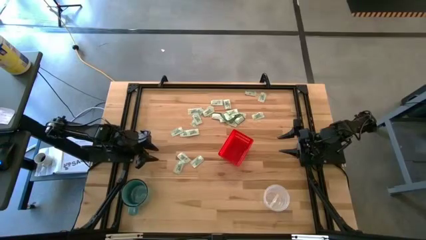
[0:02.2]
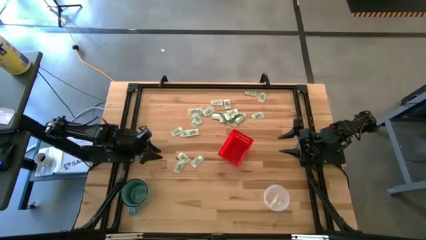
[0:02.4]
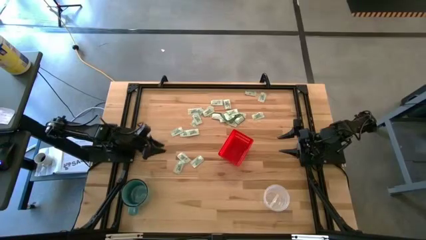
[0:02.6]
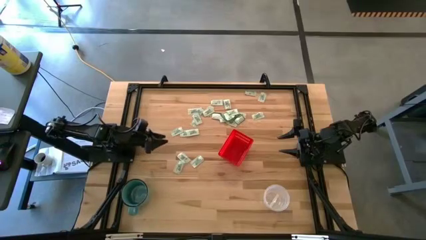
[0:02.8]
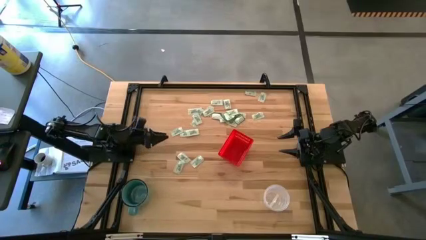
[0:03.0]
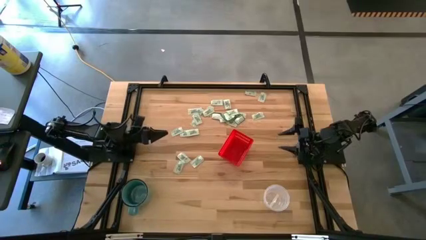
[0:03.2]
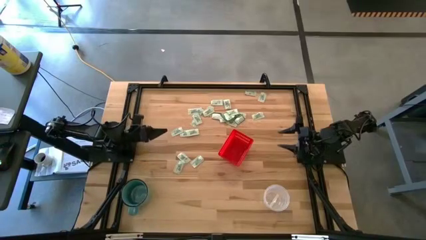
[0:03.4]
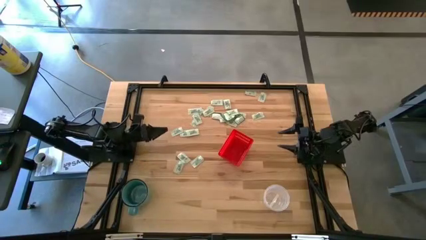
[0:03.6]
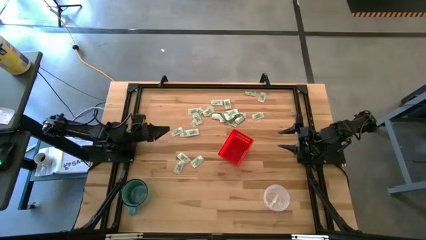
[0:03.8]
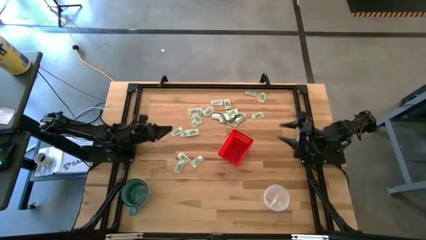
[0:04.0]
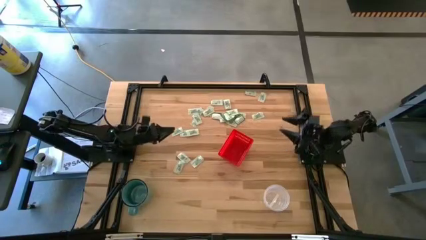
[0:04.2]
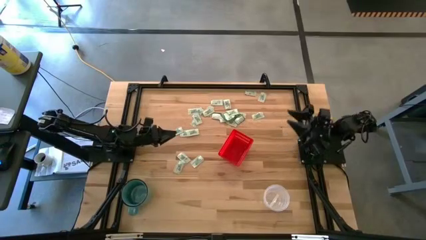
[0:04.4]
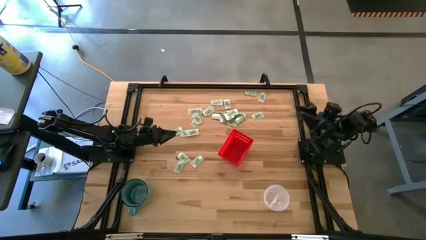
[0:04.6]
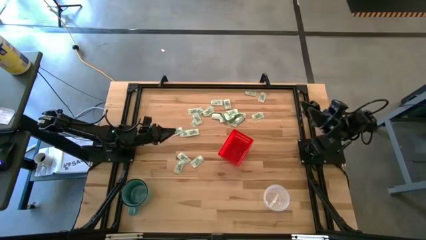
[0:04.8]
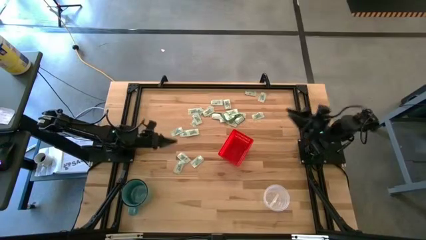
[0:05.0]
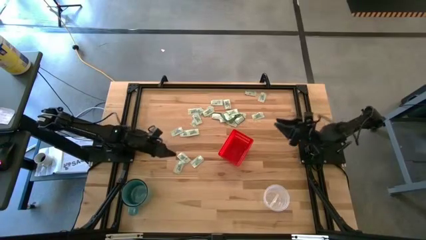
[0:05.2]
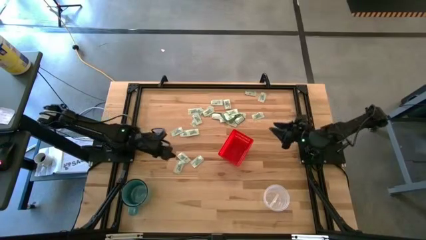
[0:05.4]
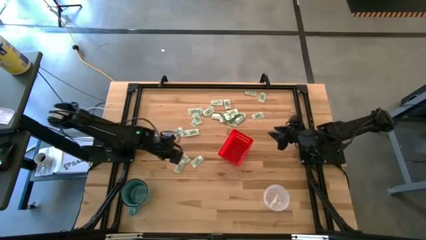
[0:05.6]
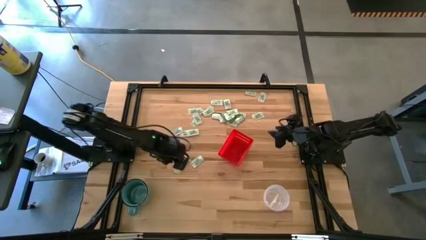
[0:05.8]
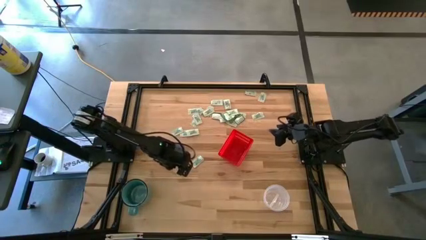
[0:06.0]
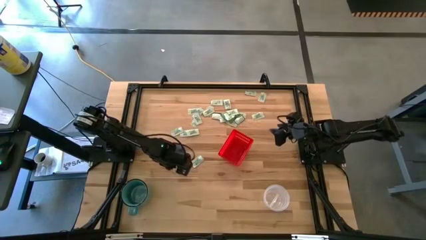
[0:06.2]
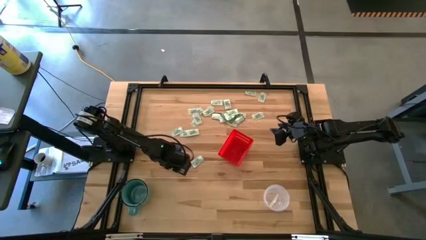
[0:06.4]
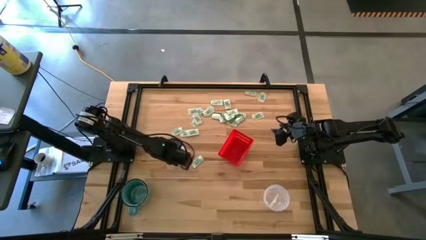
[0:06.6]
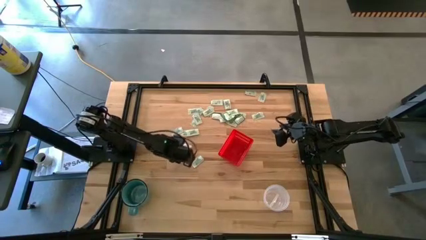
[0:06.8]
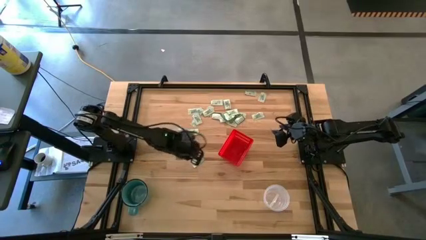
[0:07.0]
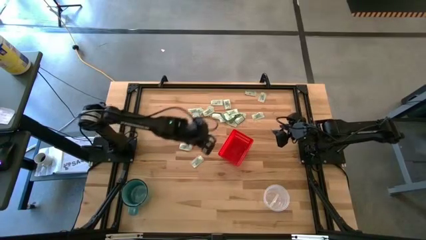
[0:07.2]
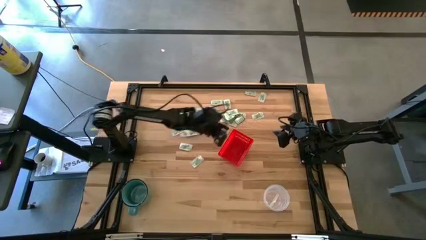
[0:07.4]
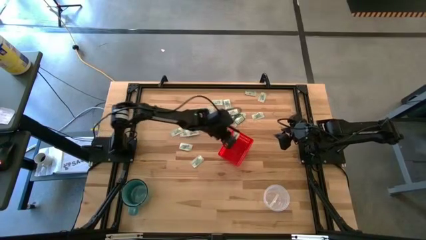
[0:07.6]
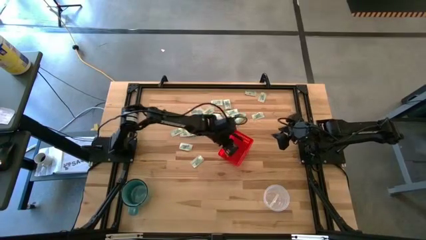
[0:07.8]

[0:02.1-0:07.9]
Task: Pick and place items into bin
Put the white stevia packet into the bin

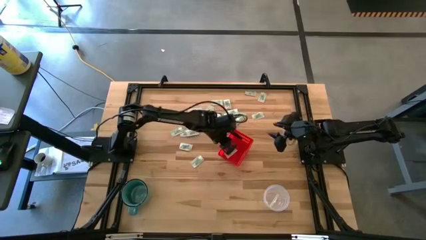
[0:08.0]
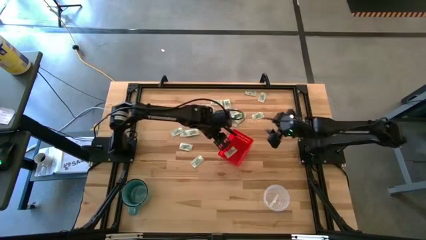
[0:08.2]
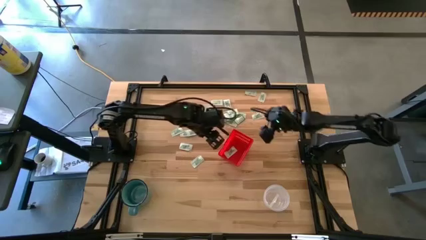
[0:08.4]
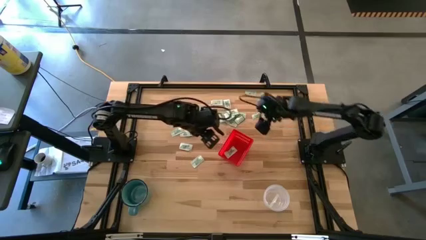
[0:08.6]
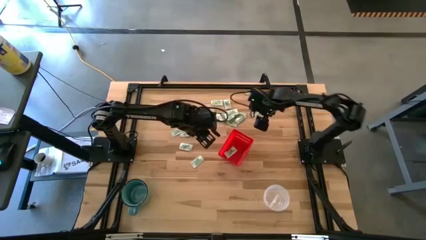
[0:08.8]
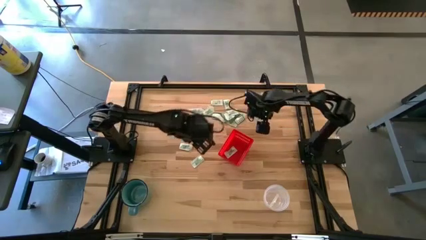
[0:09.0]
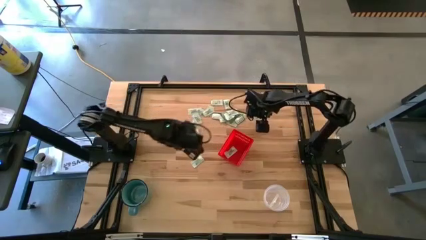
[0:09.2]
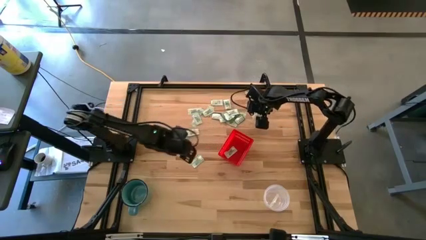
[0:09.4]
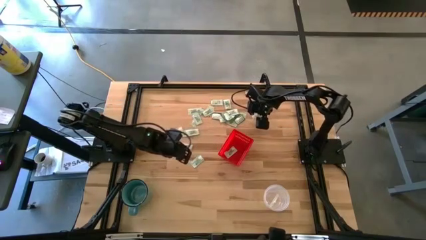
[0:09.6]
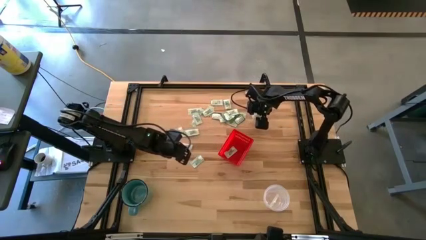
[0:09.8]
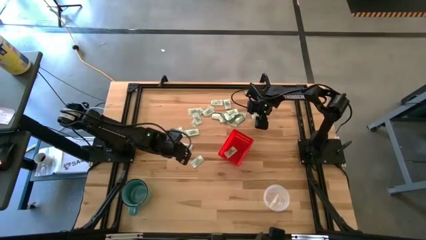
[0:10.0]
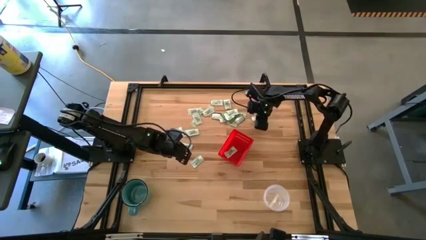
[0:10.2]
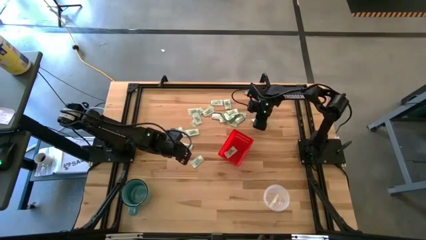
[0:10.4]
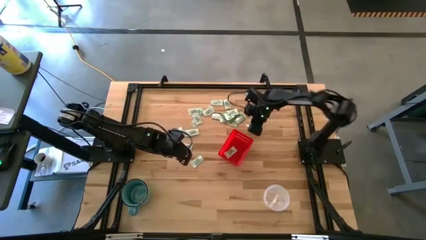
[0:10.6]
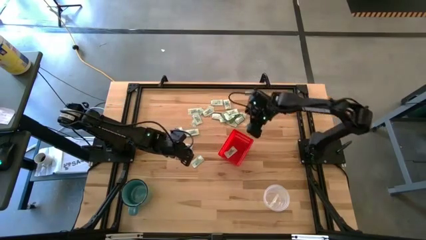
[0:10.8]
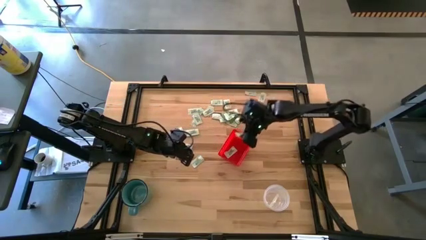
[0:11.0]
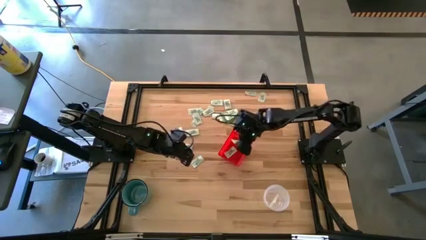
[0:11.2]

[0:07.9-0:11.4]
Put the white stevia packet into the bin

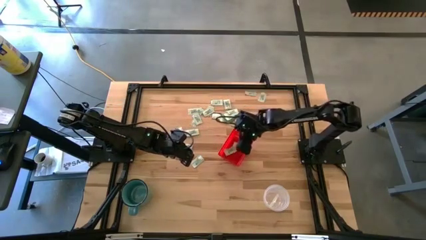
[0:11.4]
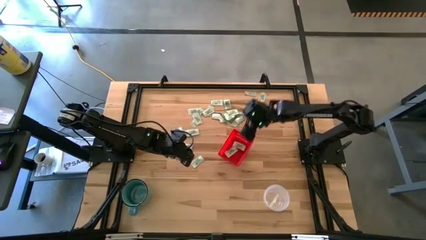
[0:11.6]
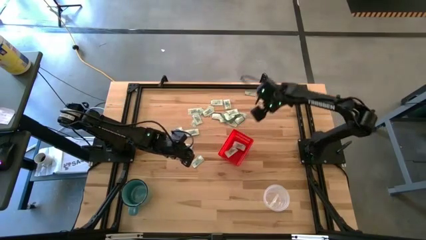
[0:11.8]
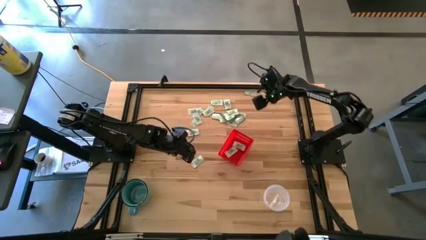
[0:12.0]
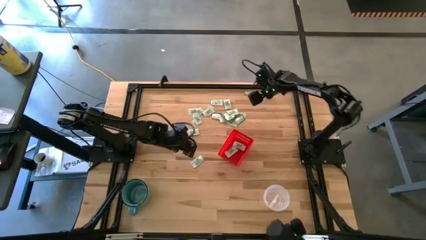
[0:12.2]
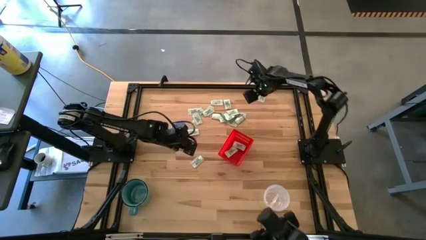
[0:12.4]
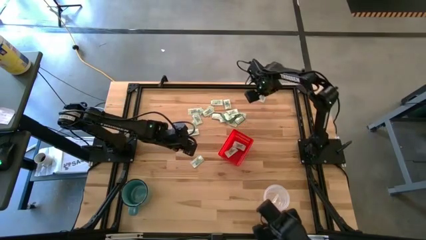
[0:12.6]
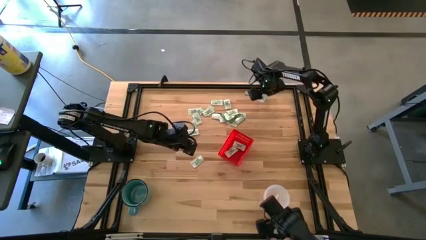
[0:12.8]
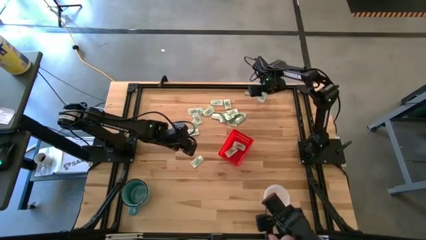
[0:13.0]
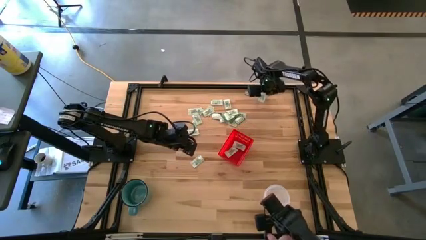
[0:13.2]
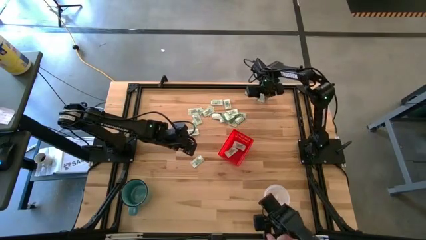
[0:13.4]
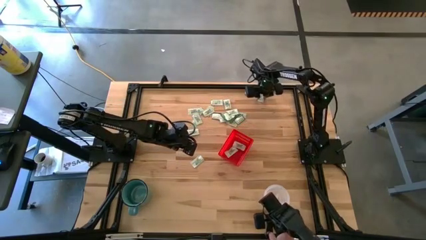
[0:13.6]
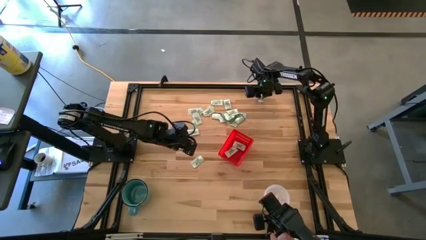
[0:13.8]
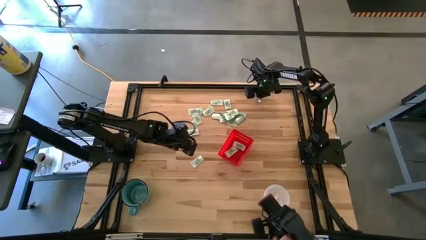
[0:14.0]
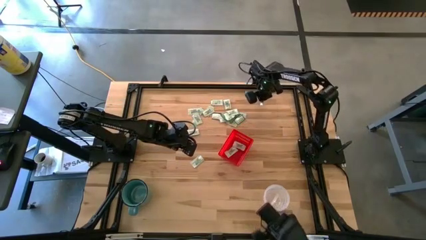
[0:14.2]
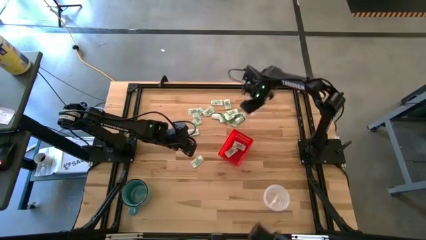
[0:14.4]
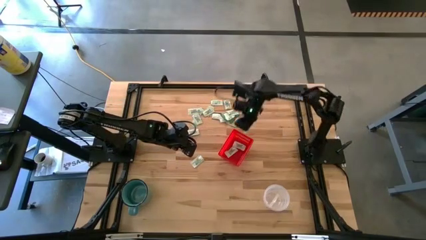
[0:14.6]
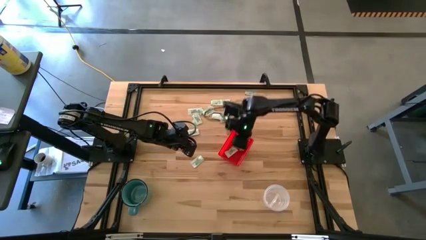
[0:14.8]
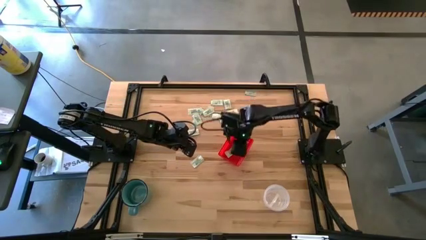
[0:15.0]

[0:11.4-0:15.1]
Put the white stevia packet into the bin

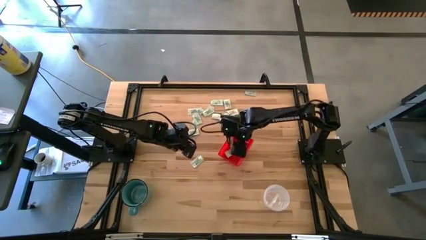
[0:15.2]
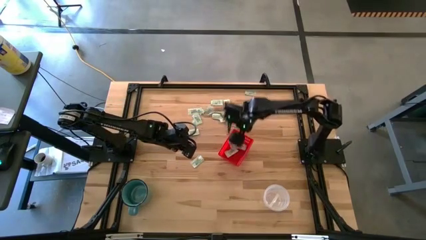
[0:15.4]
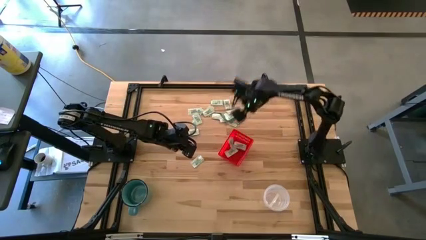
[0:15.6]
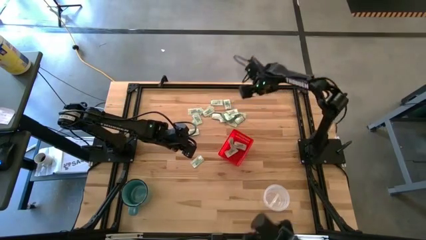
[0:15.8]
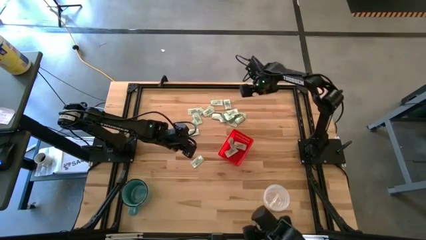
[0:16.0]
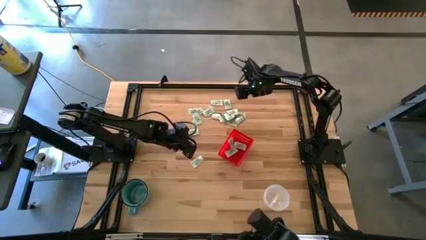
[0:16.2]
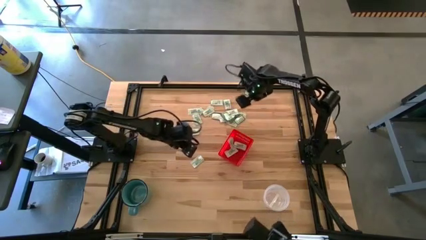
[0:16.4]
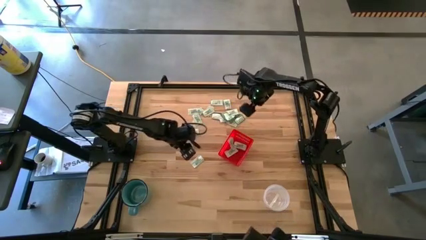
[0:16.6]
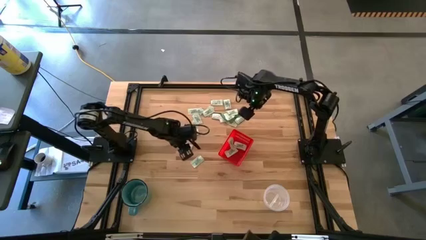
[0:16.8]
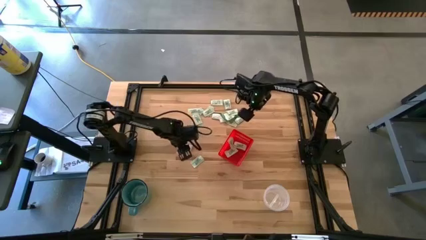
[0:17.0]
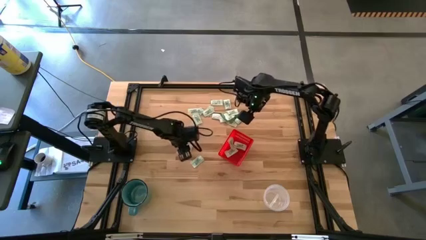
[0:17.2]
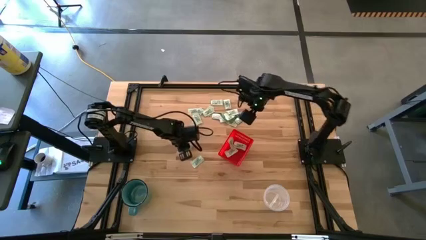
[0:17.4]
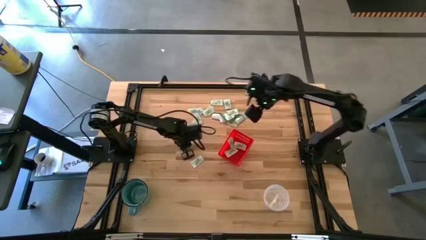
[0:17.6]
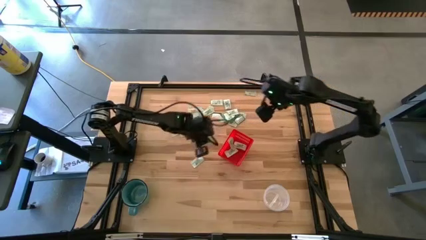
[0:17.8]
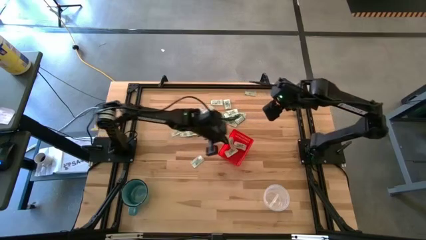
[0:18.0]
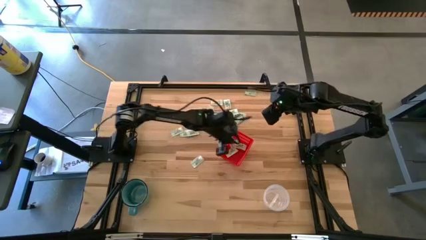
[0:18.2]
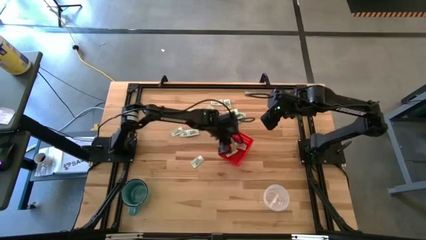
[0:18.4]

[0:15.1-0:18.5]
Put the white stevia packet into the bin

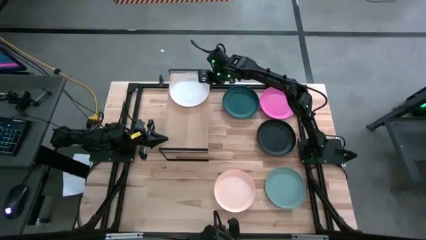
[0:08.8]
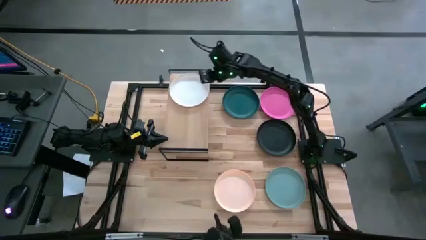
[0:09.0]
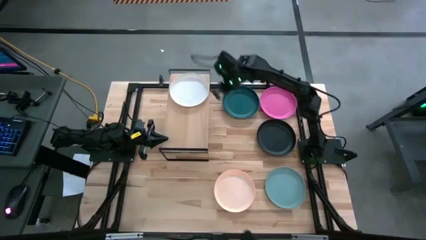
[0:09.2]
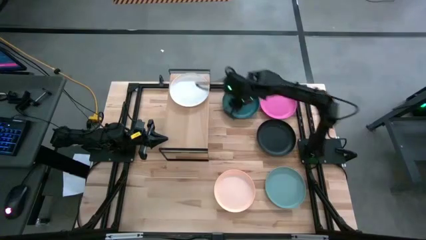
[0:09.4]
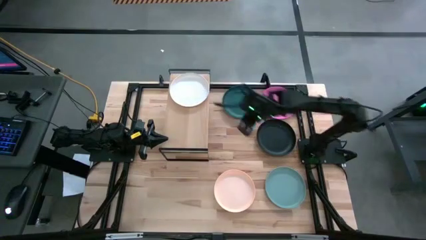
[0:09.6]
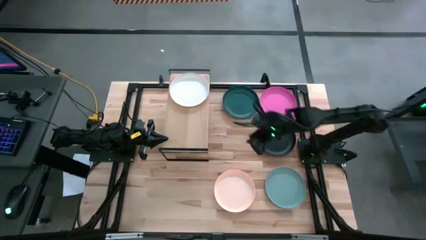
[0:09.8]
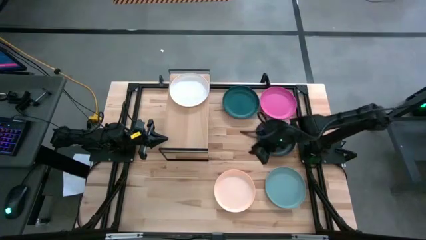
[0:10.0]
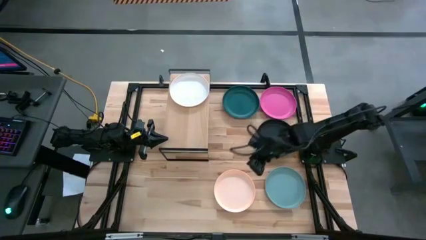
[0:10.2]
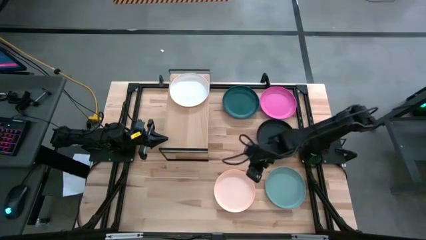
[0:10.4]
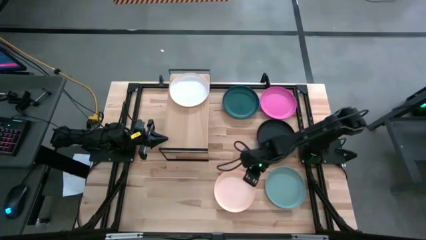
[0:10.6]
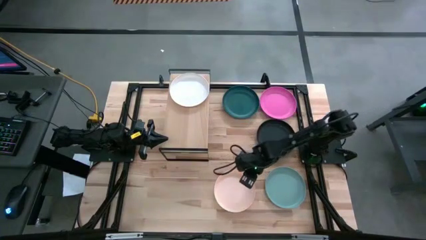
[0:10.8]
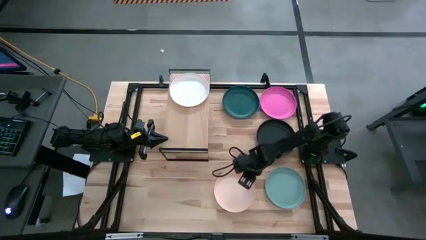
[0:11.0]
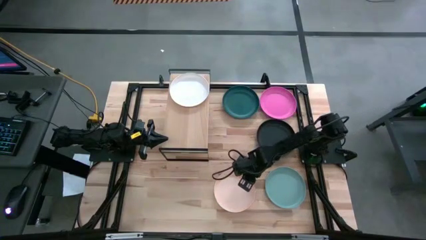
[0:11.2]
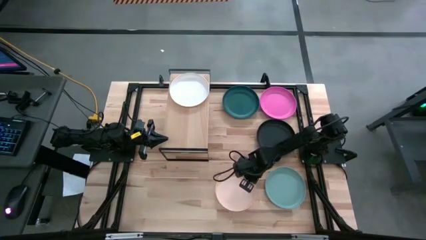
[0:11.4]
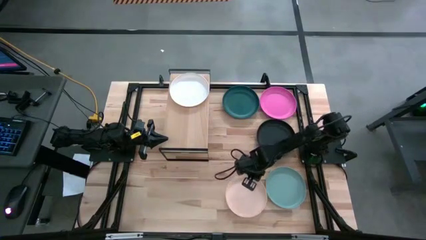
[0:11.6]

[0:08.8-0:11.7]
Task: Place and stack plates onto a shelf
Stack the light orange plate on top of the white plate on the shelf
